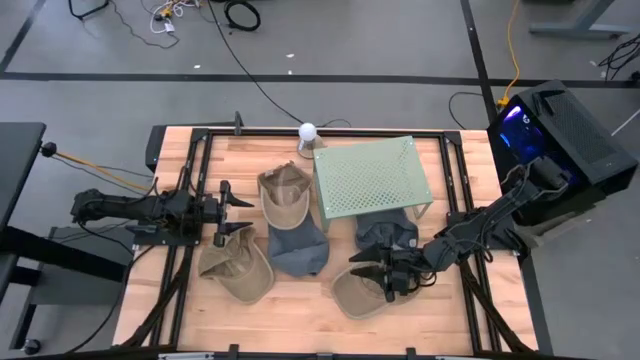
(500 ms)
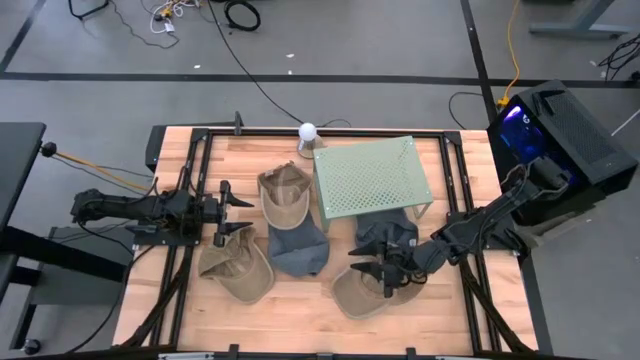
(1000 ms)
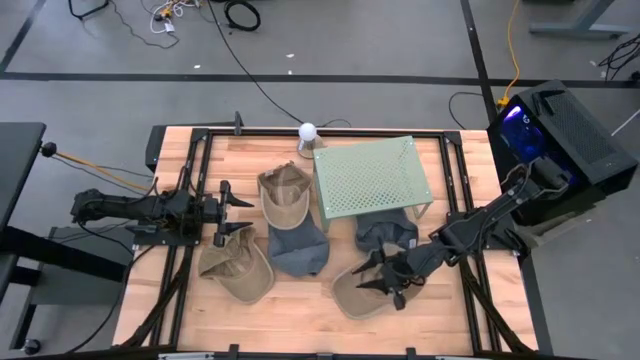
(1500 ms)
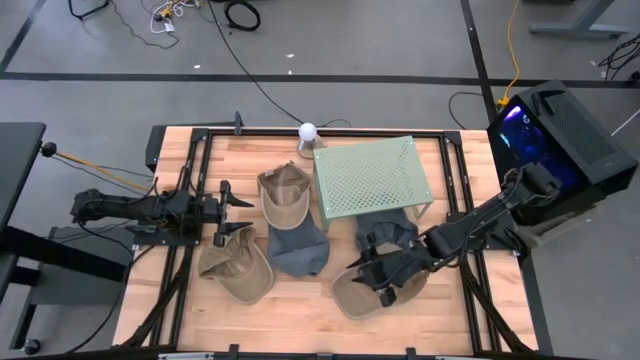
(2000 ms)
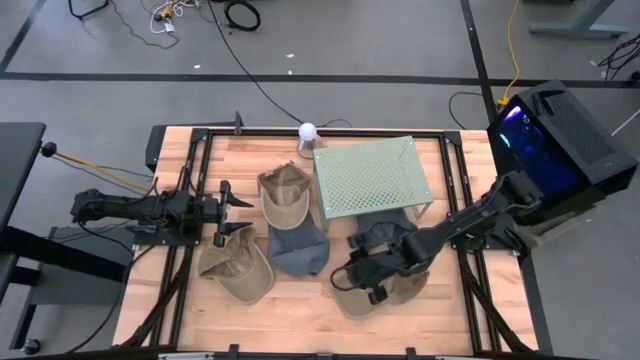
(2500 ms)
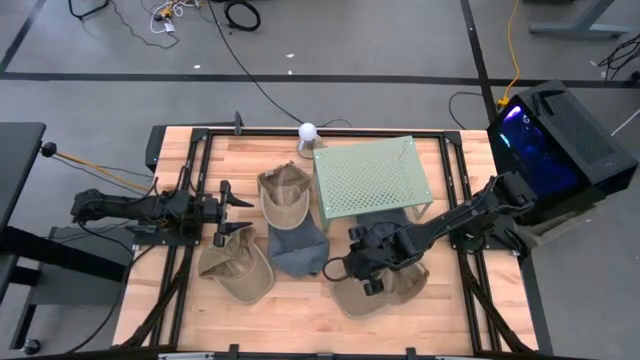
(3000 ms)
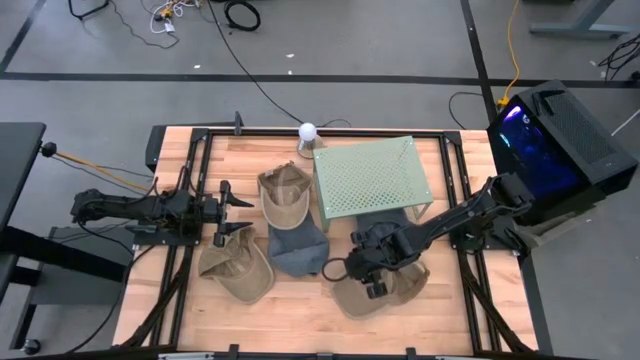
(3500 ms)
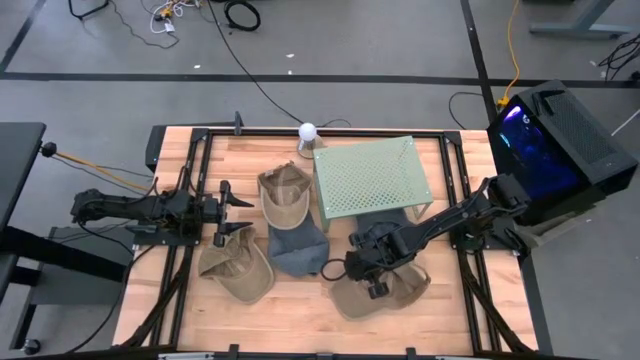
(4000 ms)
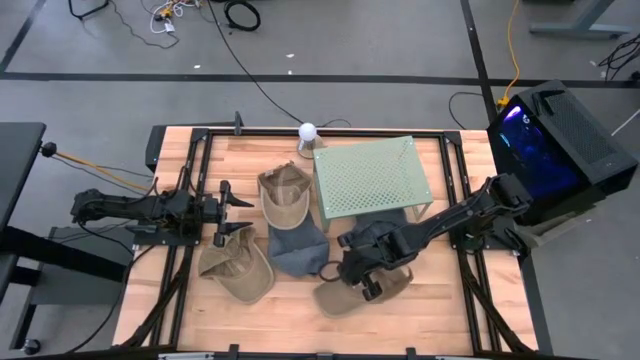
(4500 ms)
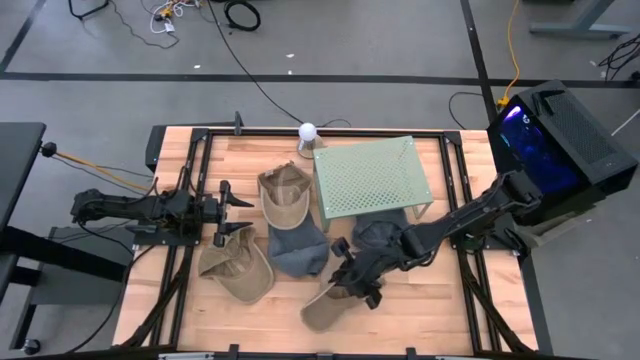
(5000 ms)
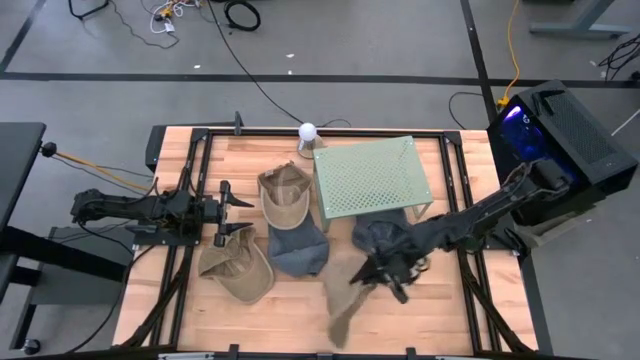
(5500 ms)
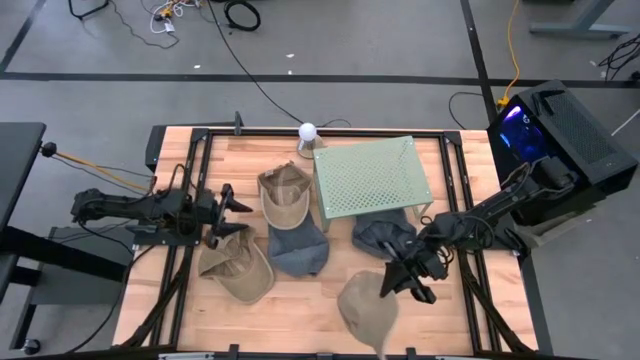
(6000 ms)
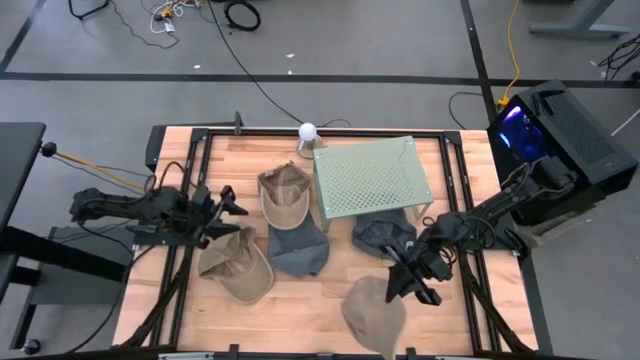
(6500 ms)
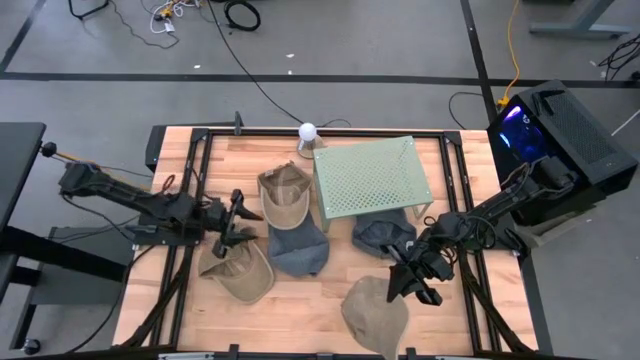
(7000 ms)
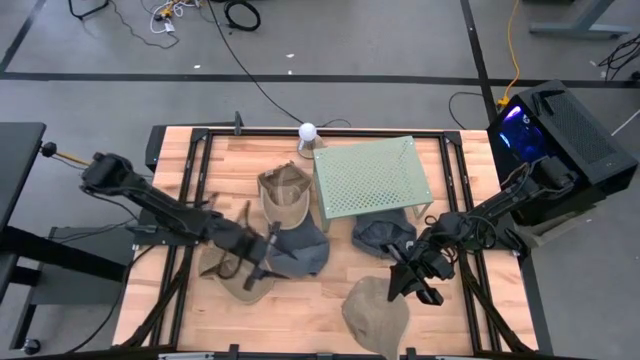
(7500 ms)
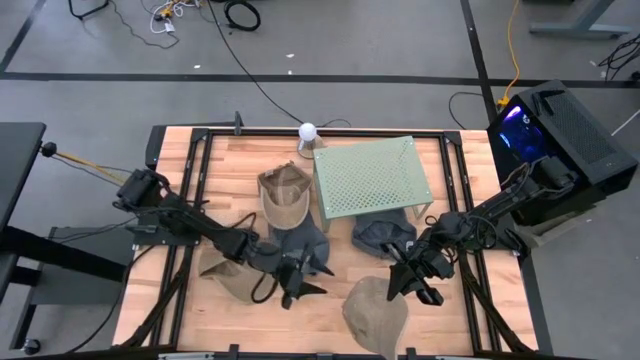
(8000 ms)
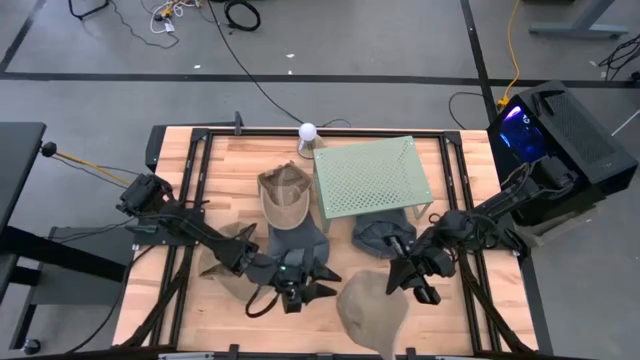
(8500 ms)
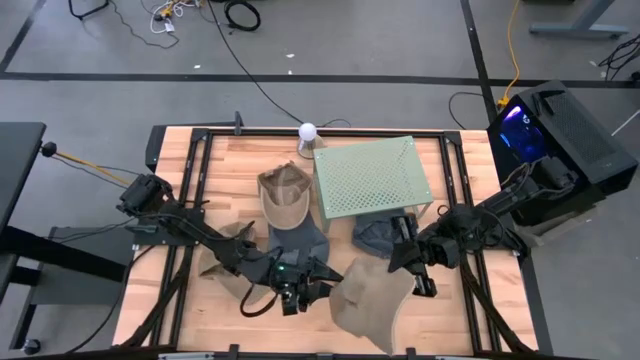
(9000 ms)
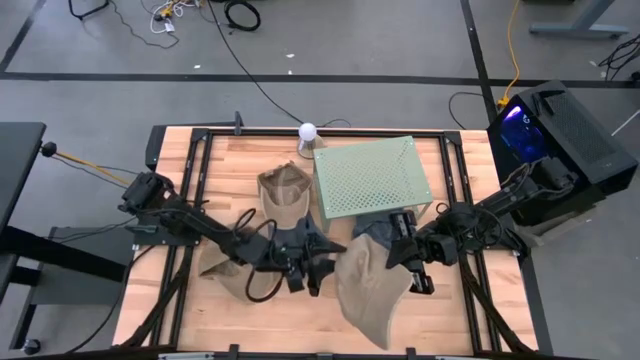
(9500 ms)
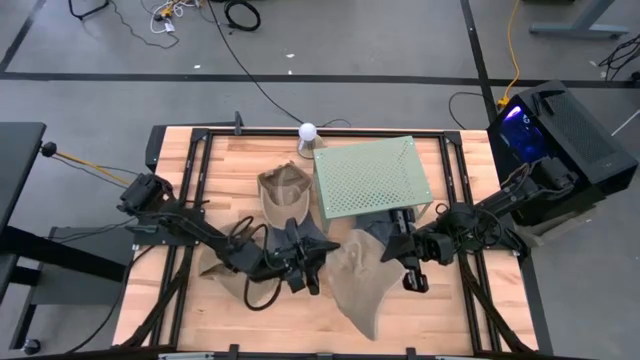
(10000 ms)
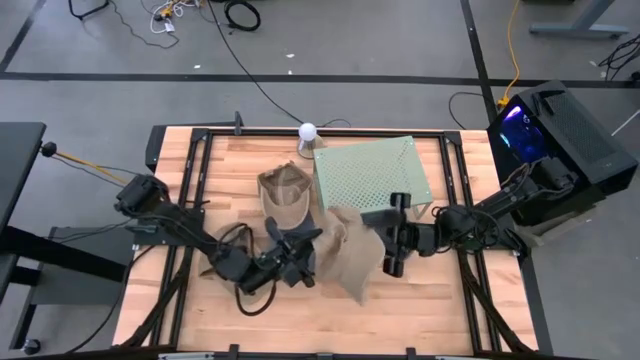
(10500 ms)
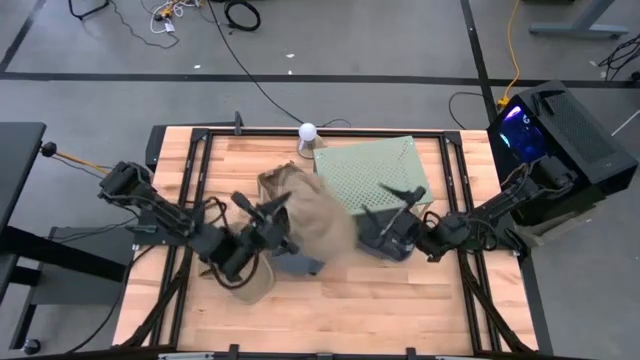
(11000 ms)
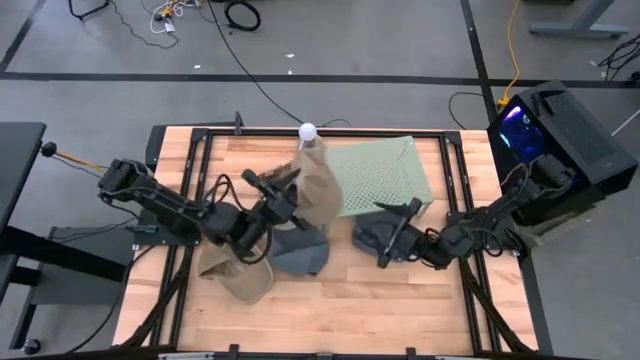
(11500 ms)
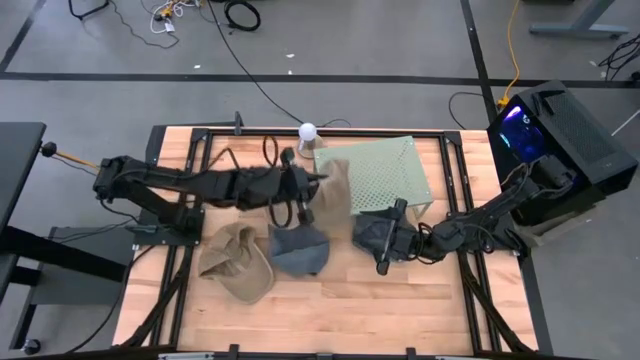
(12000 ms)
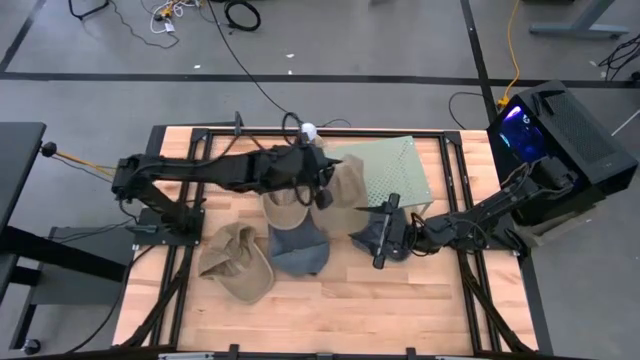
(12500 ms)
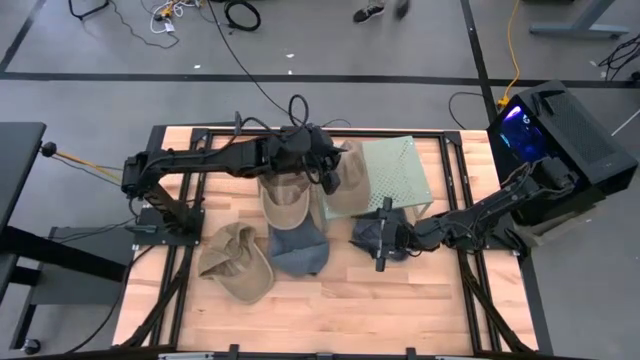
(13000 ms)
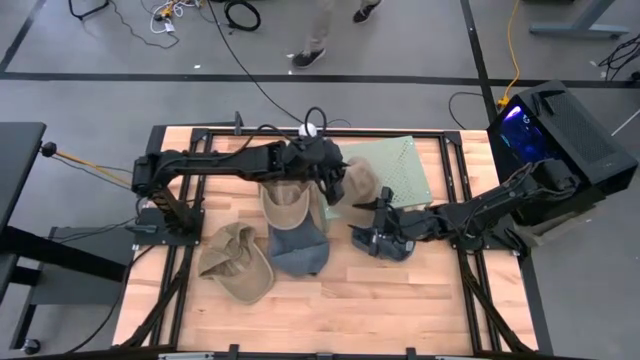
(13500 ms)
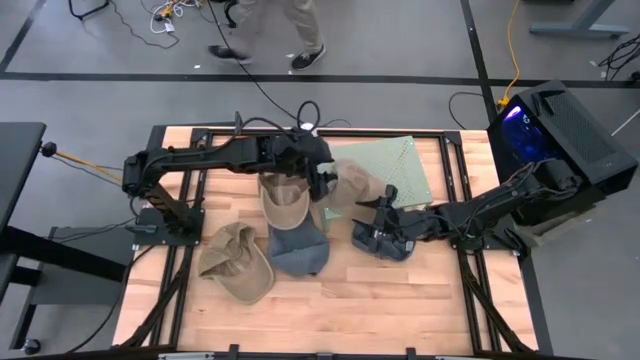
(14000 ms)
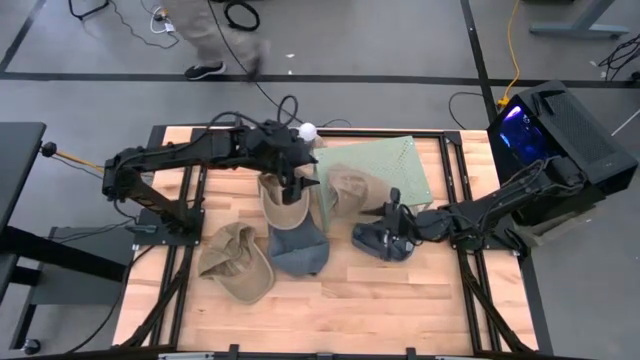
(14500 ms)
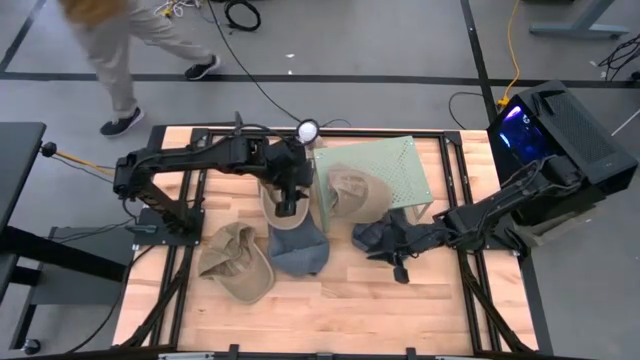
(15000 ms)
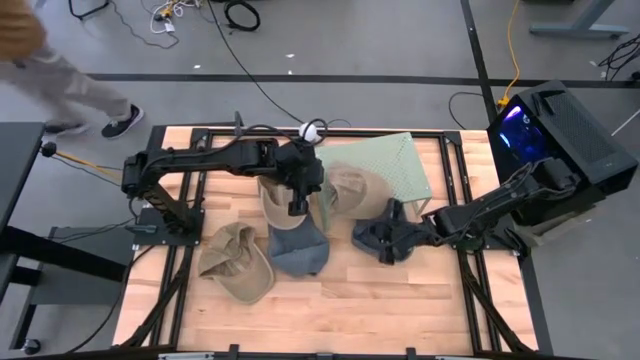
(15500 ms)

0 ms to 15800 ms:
Task: Stack caps on shelf
Put the bottom right brown cap on the shelf

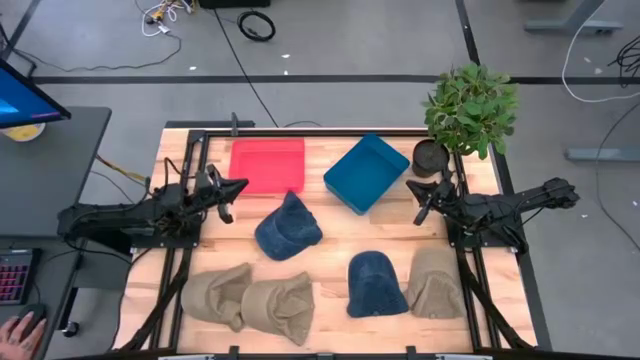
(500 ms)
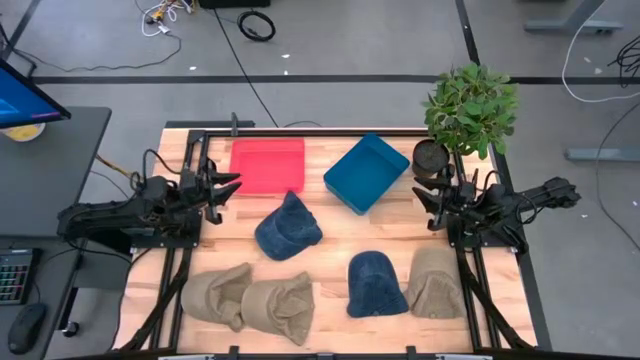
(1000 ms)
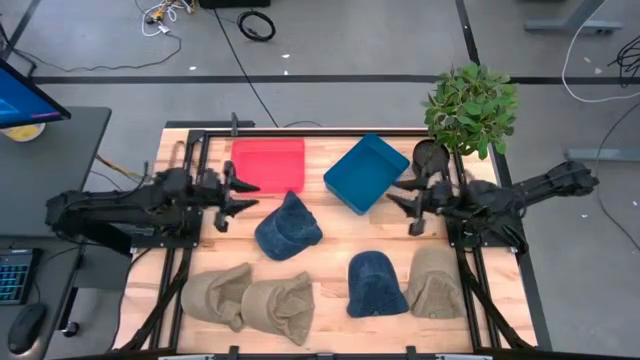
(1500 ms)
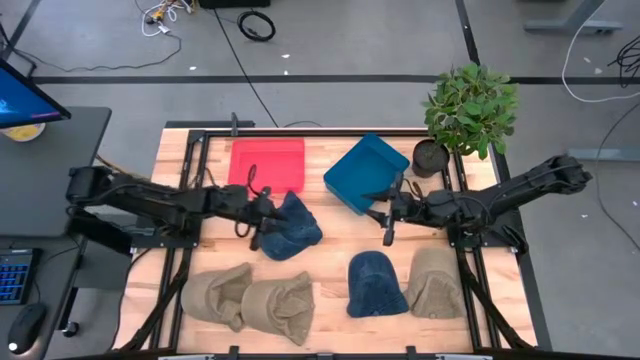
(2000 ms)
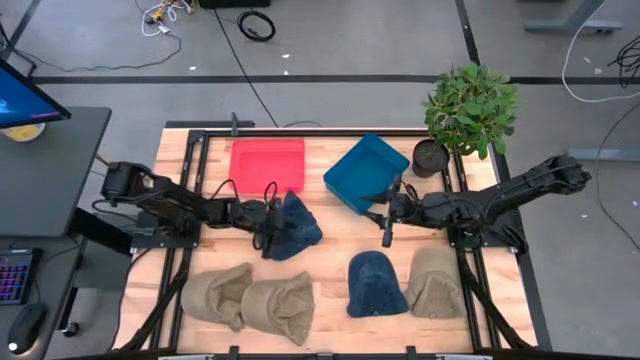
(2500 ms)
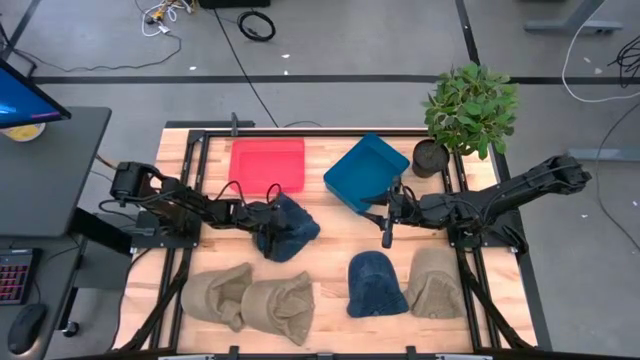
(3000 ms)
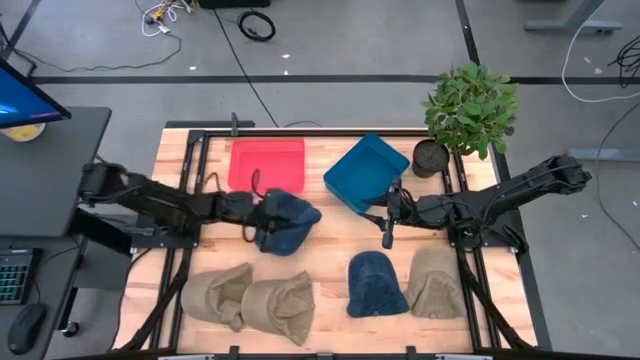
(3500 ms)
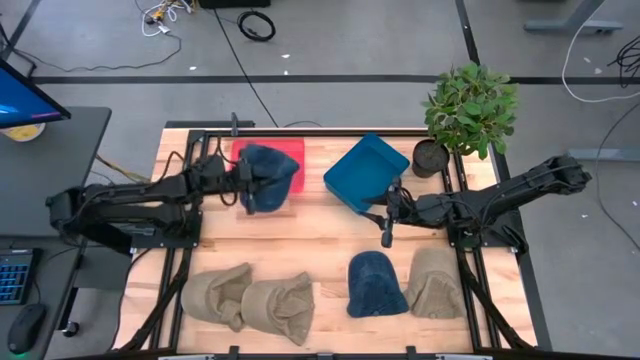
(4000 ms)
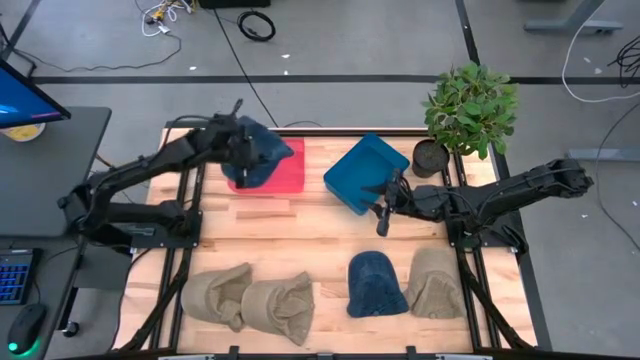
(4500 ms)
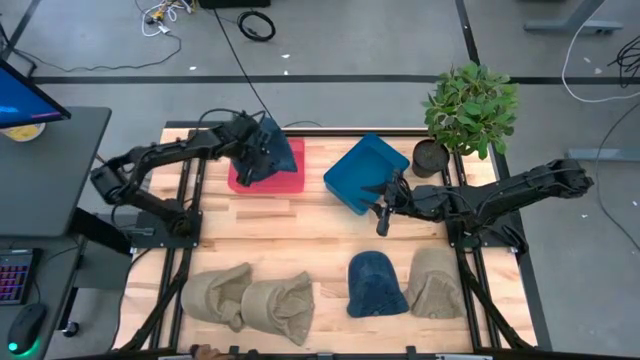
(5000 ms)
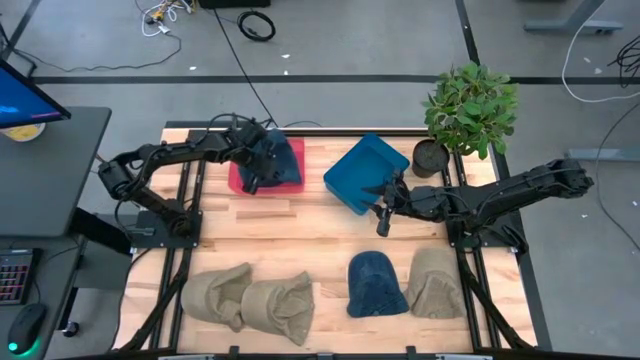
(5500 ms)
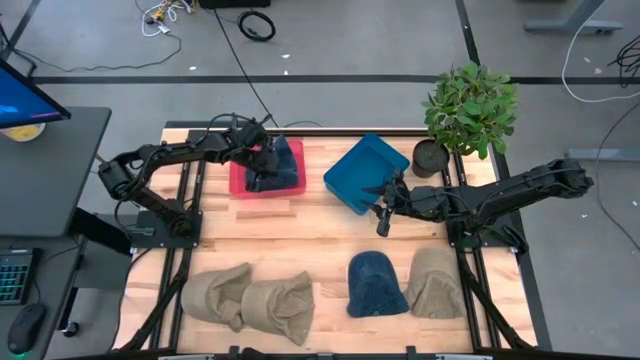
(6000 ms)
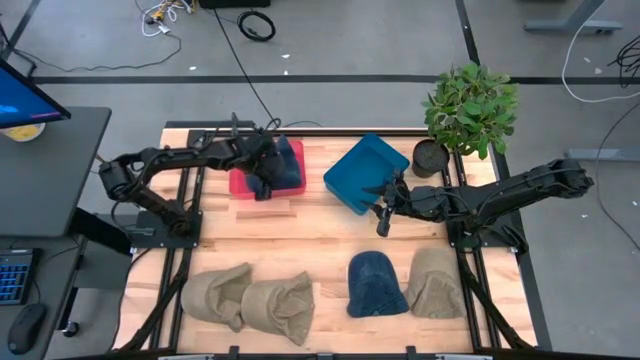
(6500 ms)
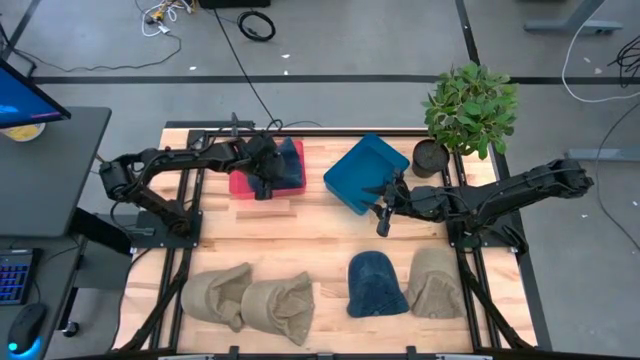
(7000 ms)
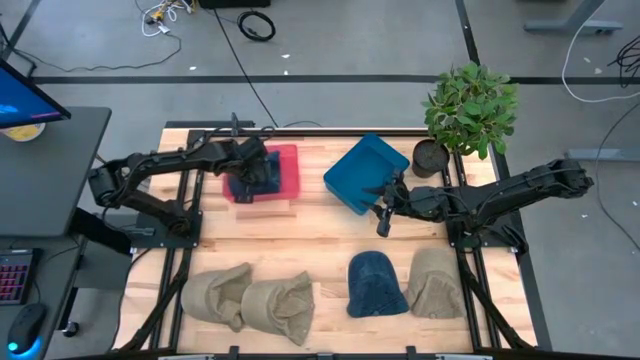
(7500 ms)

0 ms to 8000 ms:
Task: Pick & Place hat
Put the top blue cap into the pink bin
